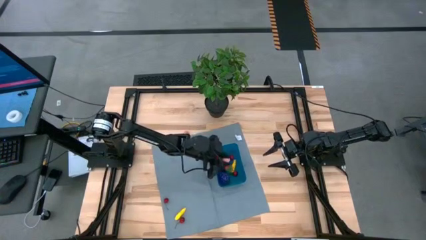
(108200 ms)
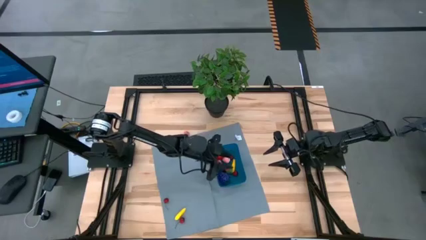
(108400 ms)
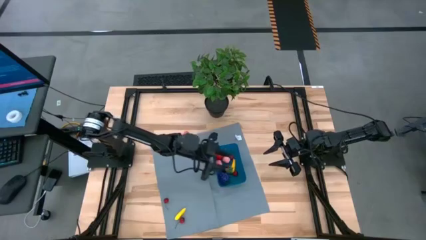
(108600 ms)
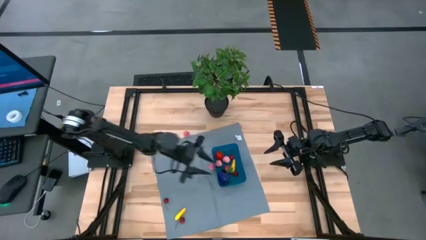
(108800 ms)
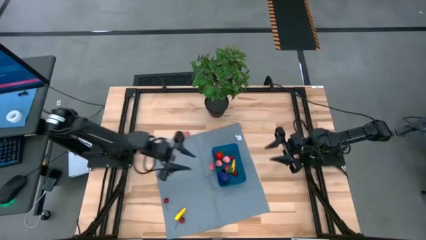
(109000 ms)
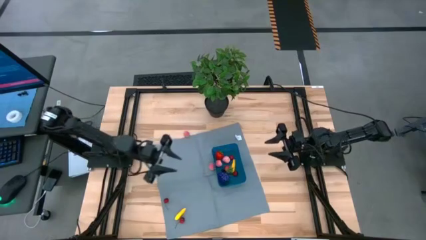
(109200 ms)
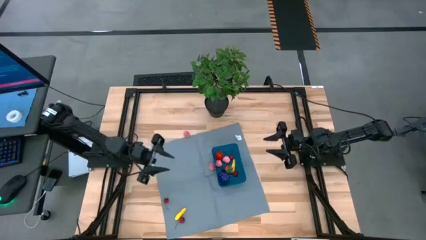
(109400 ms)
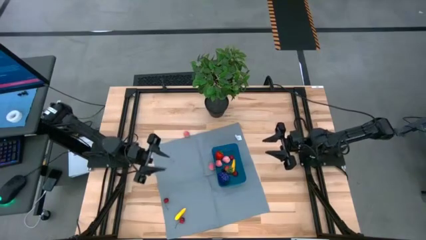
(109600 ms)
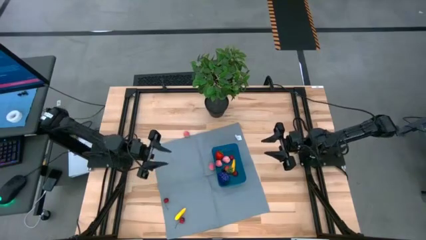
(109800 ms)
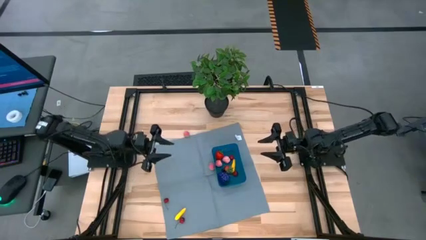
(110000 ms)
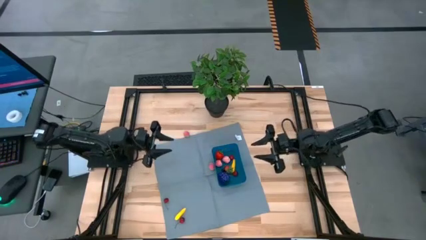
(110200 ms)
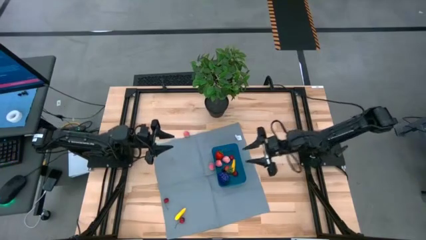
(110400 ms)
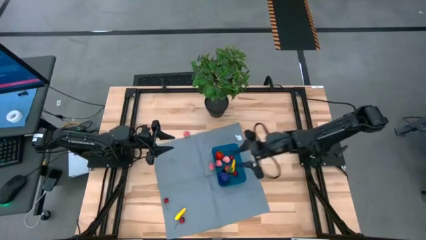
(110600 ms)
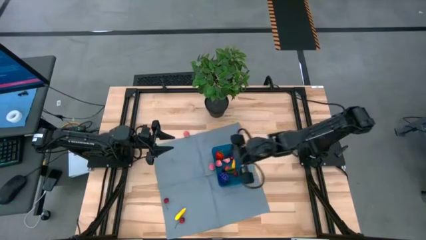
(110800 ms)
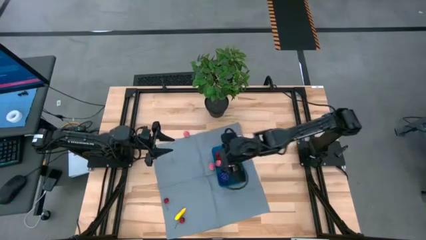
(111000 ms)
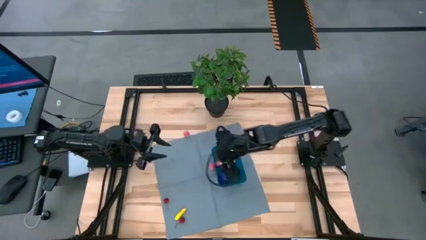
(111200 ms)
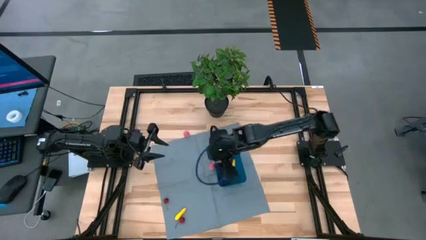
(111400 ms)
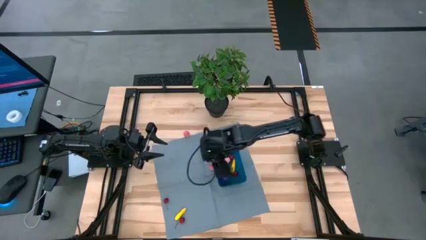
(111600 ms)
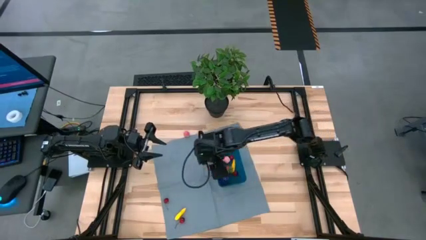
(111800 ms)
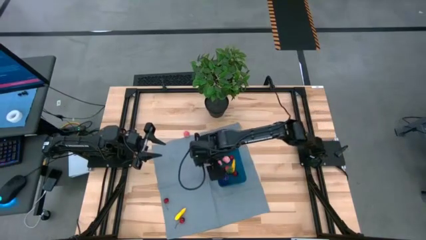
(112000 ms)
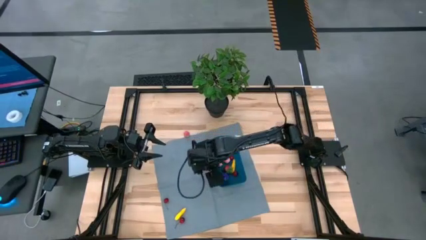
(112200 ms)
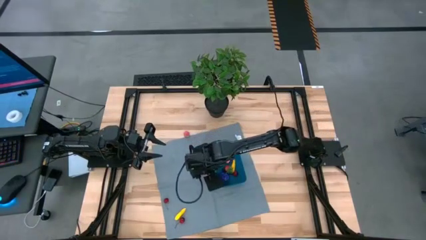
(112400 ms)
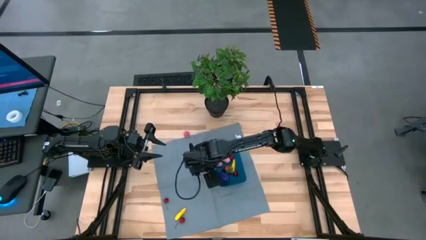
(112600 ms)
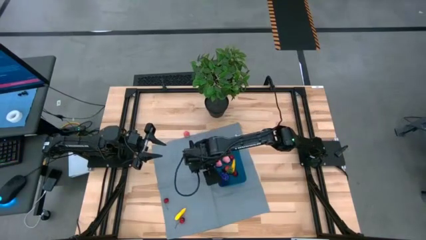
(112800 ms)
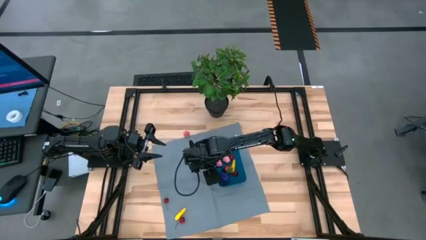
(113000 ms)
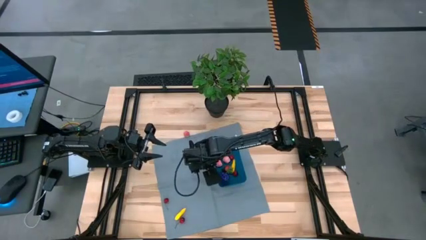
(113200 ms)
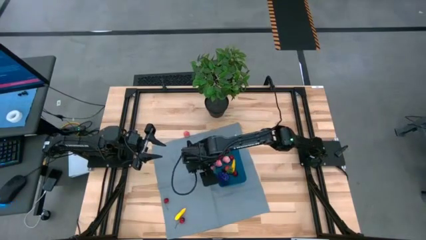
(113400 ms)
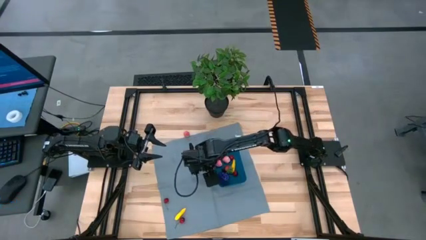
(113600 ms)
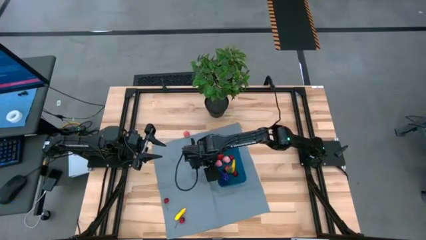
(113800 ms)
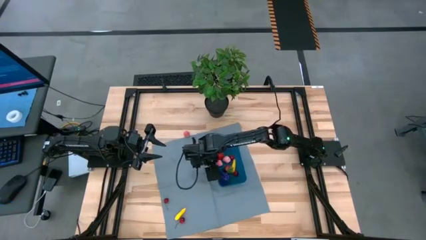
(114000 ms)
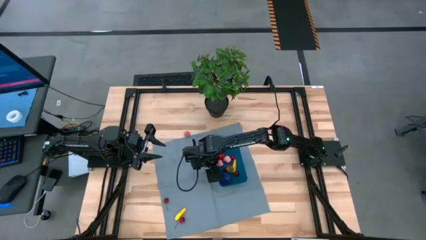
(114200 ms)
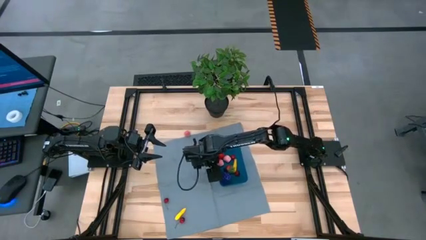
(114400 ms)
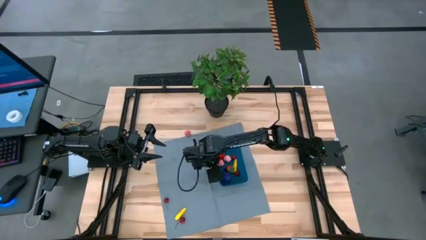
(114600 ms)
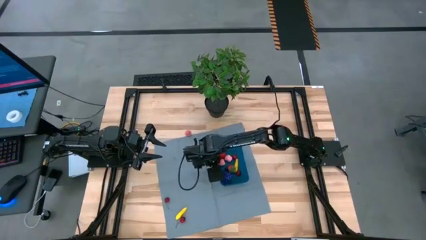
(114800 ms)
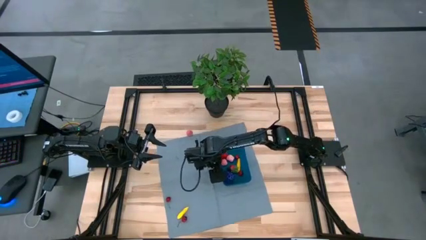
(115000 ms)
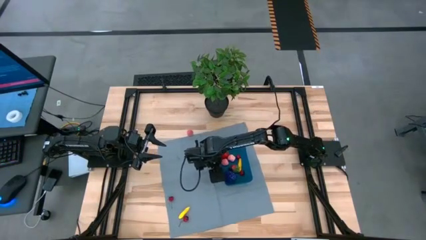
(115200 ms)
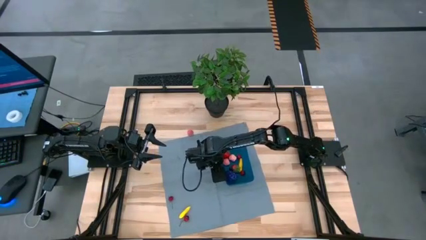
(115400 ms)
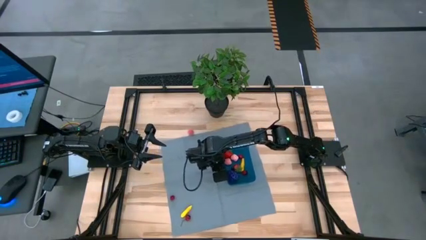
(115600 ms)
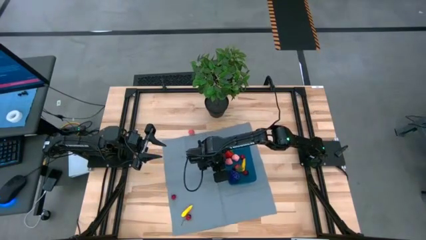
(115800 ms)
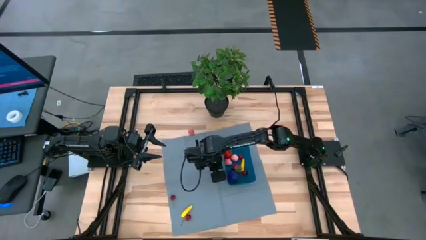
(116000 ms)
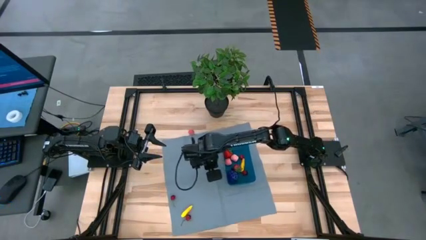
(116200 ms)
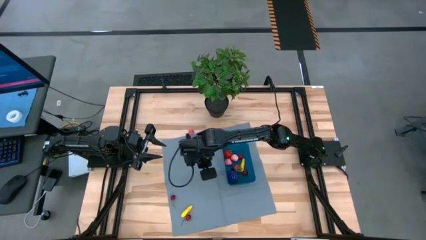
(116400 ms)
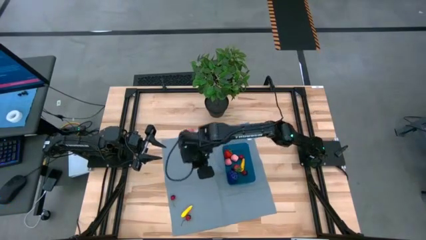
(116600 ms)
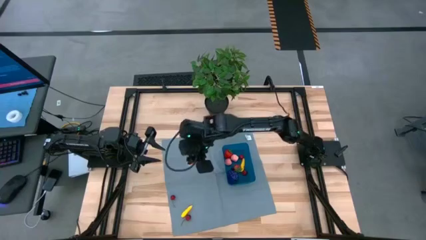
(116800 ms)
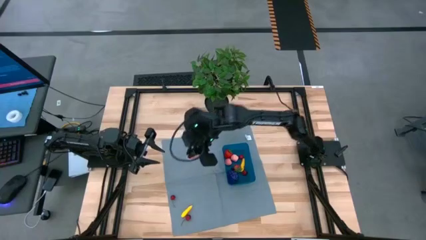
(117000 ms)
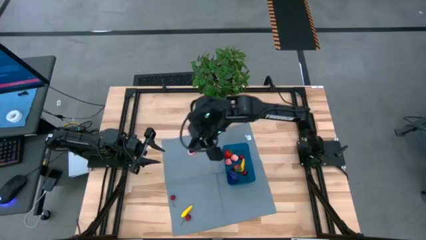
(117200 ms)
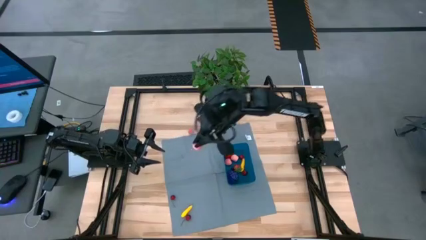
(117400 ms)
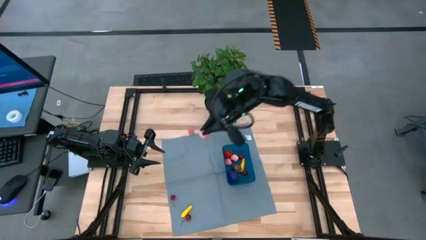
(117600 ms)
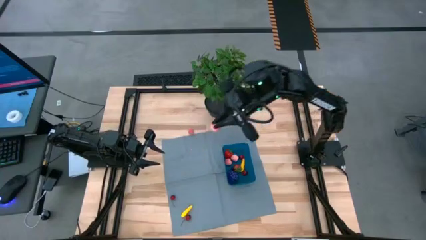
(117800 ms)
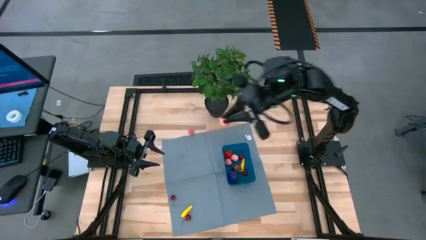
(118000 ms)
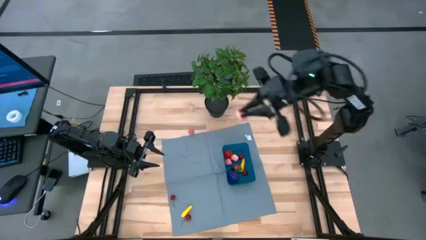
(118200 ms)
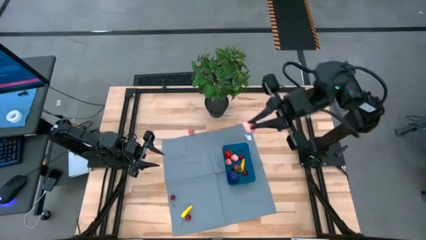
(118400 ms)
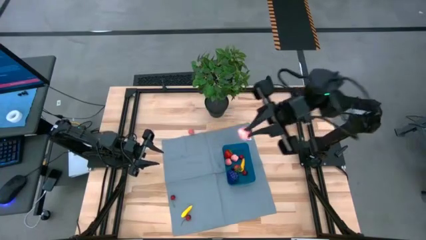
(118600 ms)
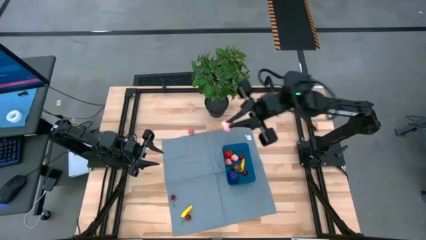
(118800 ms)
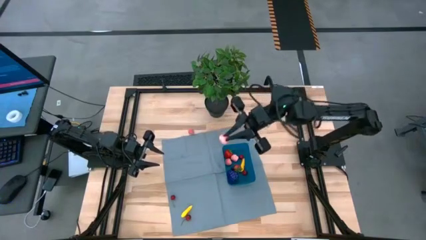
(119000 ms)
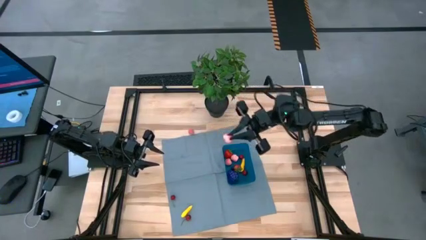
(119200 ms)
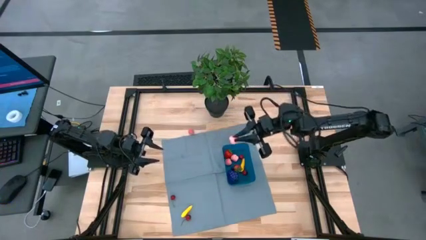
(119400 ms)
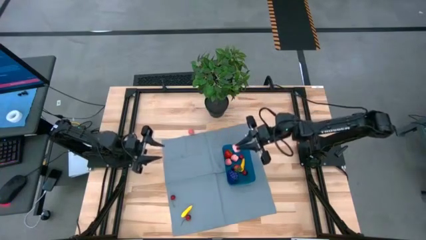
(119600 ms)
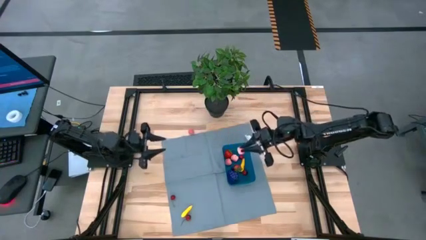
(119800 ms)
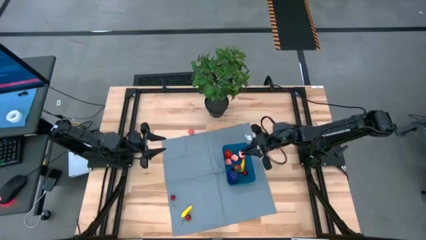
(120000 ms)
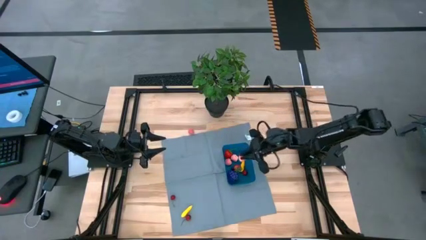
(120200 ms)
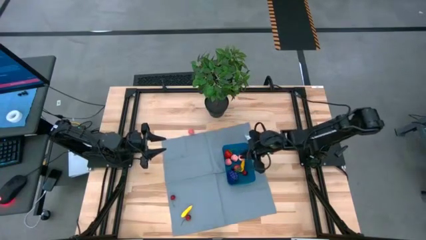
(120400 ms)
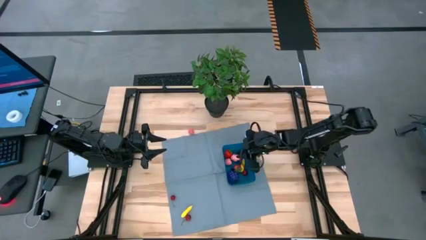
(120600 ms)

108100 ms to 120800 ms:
Task: Pick and placing Produce into tupperware
Put the peach into the bin

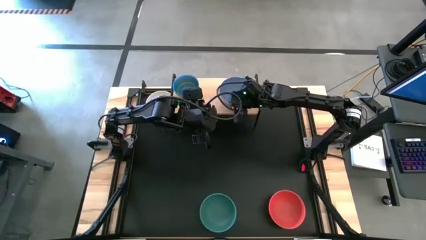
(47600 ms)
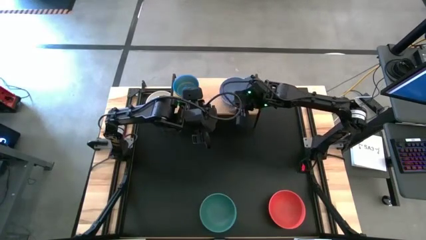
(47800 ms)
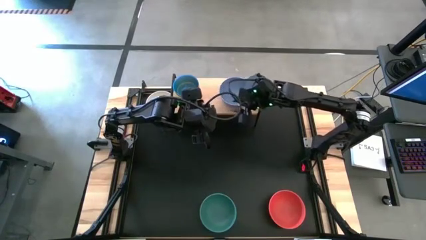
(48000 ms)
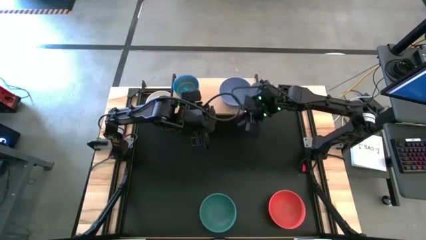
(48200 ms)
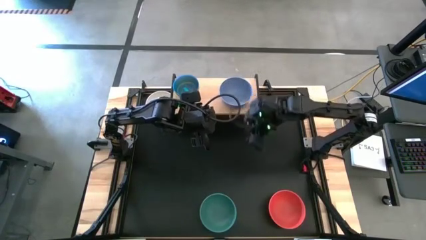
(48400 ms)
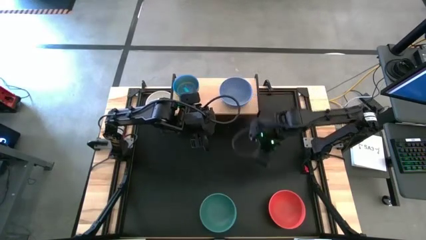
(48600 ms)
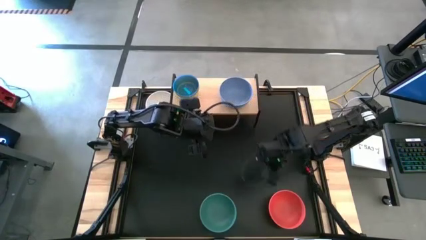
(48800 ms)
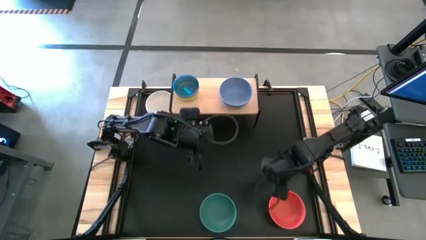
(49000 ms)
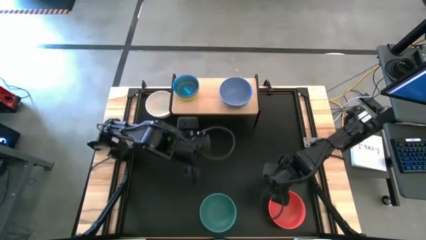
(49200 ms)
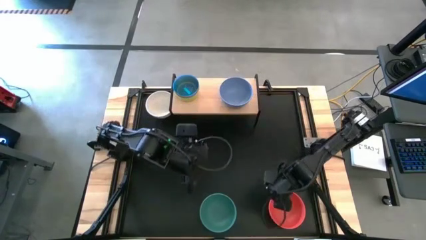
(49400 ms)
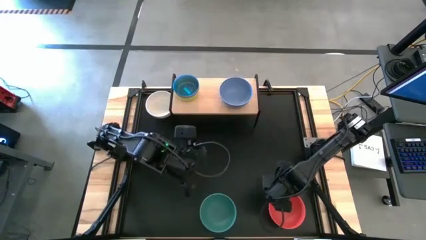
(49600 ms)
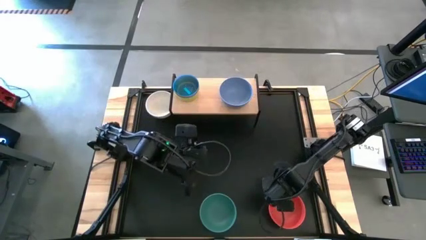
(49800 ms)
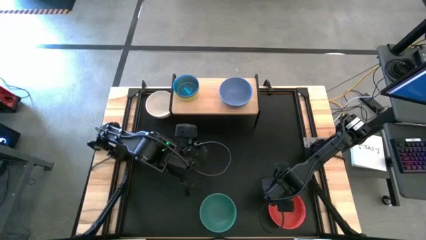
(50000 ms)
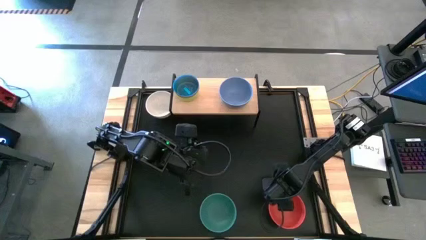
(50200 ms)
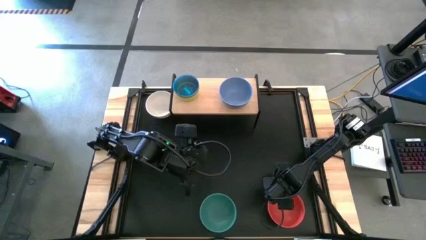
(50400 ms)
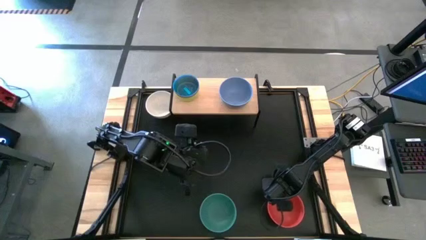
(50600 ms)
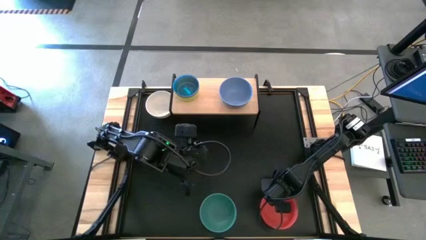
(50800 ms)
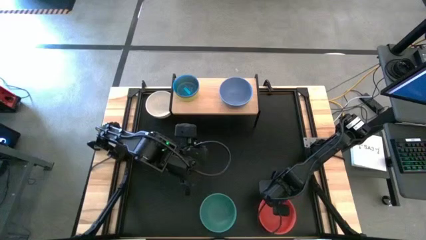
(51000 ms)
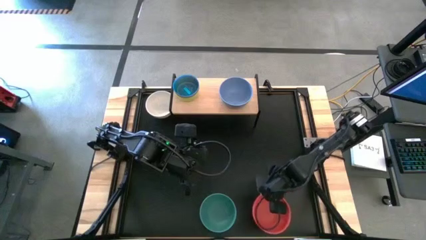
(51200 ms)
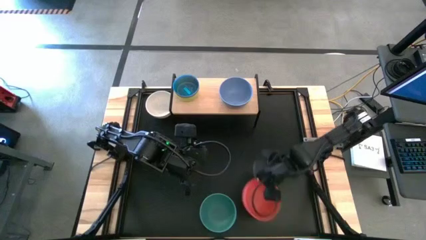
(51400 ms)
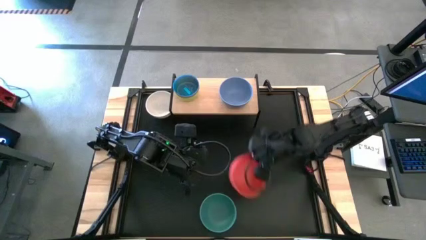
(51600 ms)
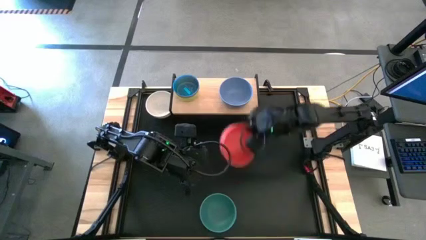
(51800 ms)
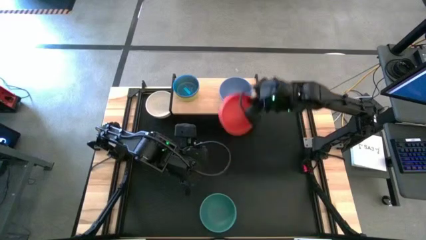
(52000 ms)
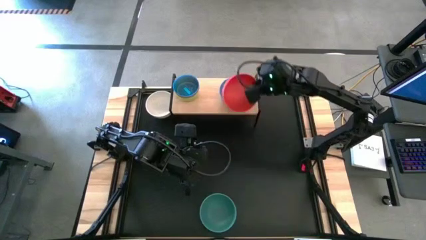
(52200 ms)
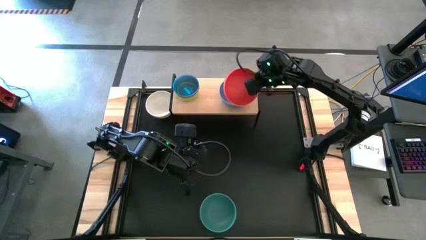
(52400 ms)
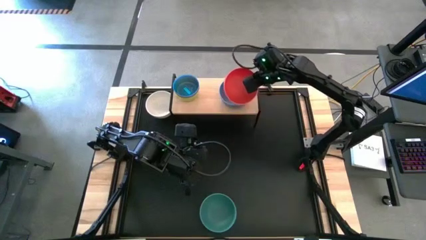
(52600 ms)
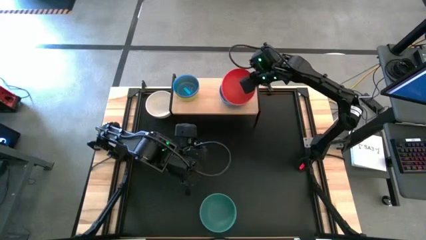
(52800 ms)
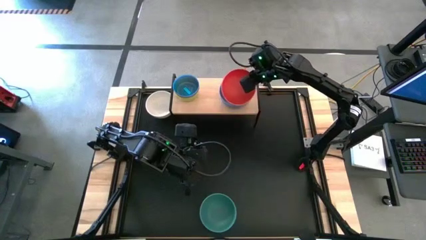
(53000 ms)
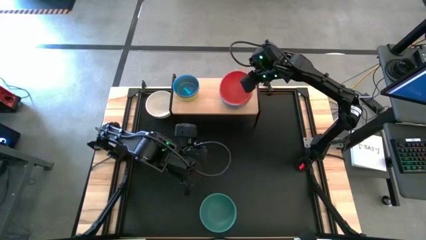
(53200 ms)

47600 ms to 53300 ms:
Task: Place and stack bowls onto a shelf
Stack the large orange bowl on top of the large purple bowl on the shelf
